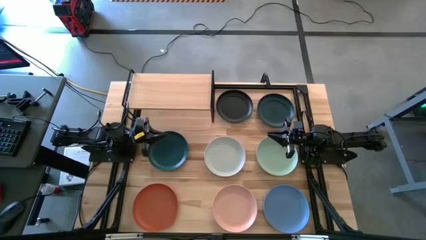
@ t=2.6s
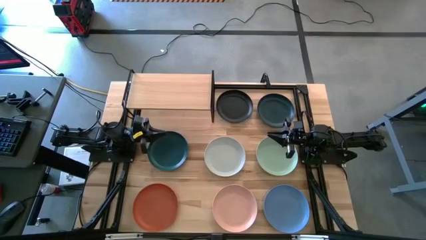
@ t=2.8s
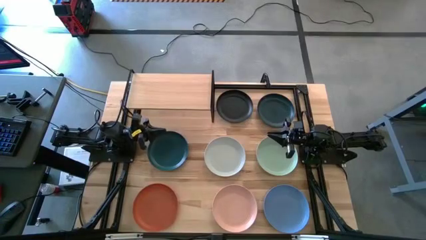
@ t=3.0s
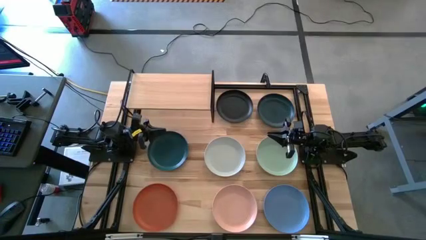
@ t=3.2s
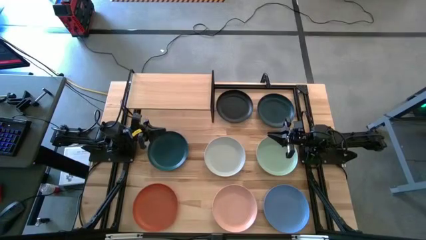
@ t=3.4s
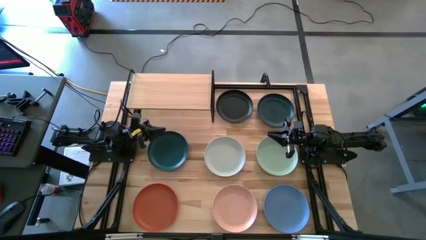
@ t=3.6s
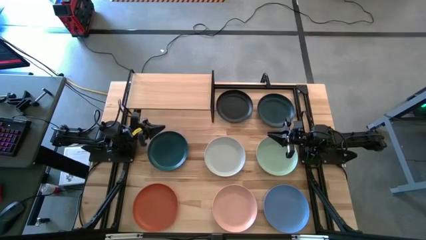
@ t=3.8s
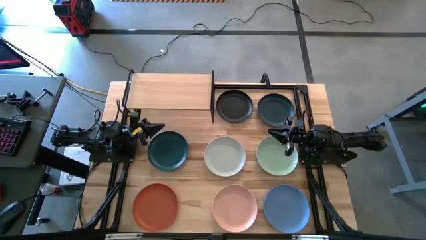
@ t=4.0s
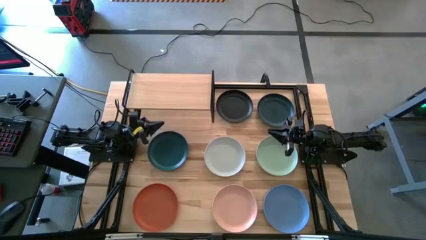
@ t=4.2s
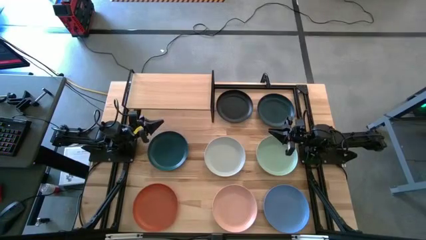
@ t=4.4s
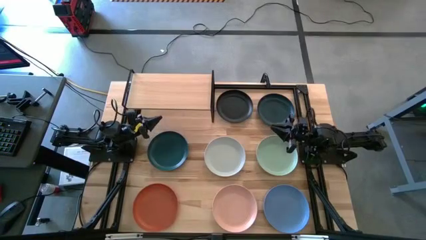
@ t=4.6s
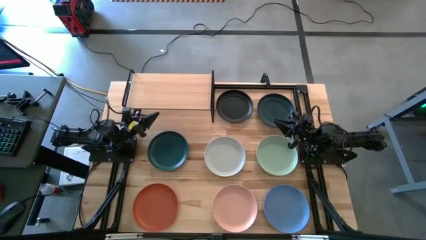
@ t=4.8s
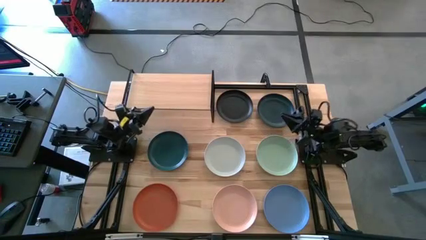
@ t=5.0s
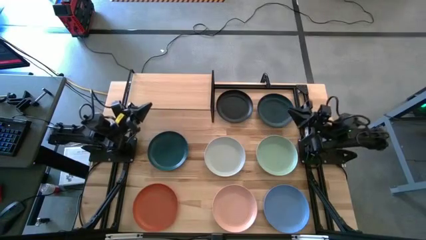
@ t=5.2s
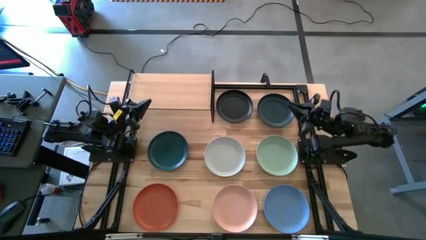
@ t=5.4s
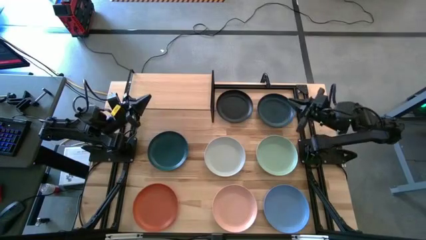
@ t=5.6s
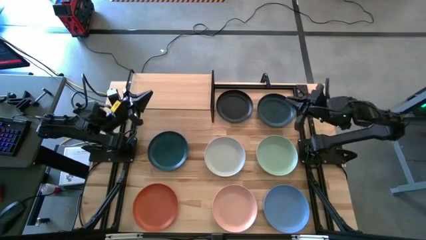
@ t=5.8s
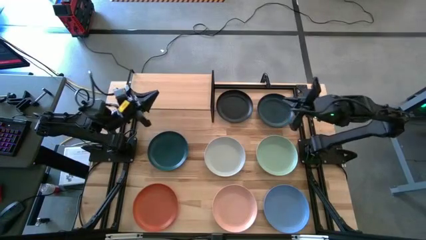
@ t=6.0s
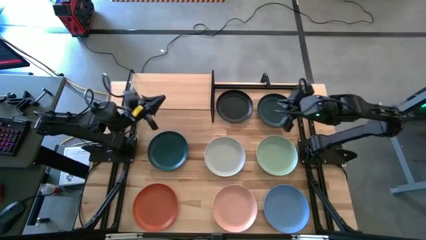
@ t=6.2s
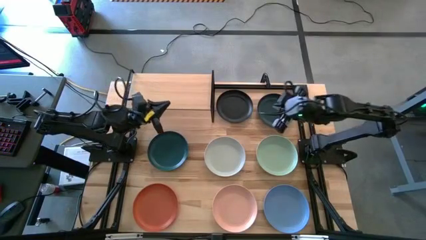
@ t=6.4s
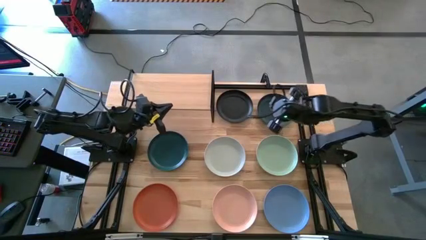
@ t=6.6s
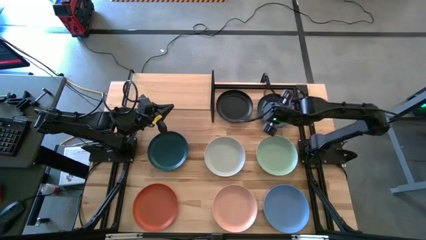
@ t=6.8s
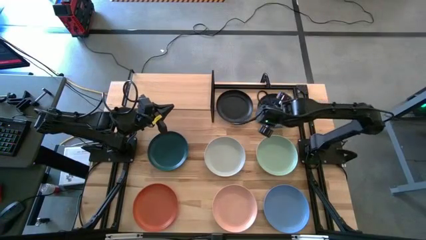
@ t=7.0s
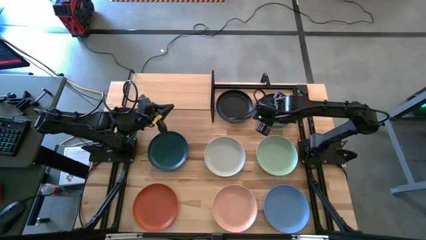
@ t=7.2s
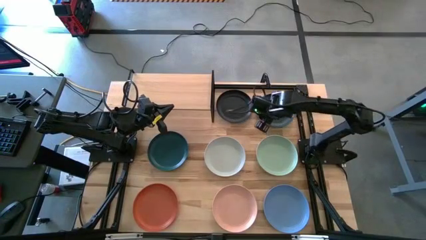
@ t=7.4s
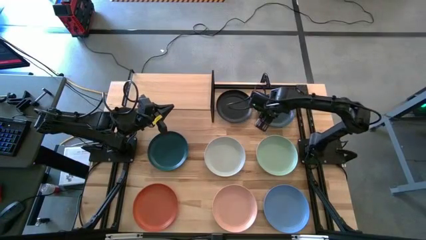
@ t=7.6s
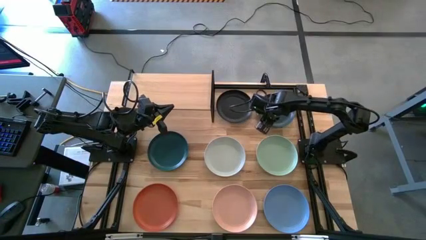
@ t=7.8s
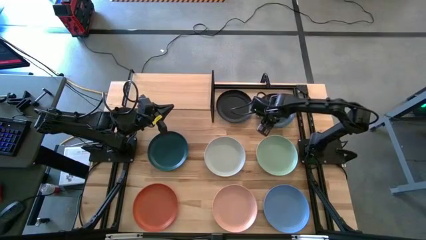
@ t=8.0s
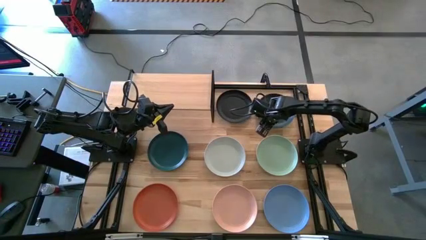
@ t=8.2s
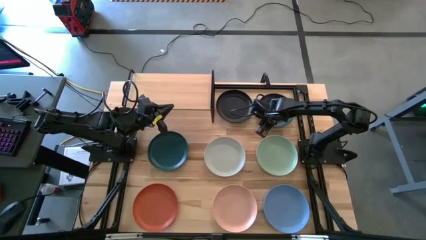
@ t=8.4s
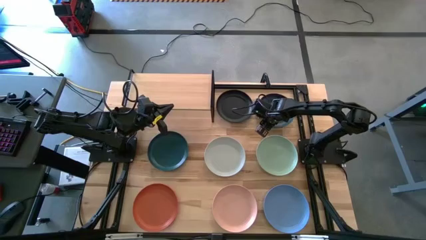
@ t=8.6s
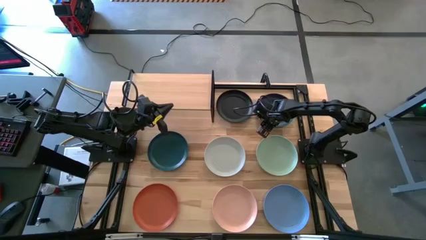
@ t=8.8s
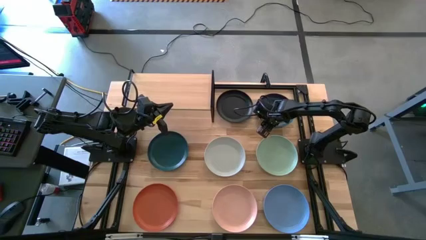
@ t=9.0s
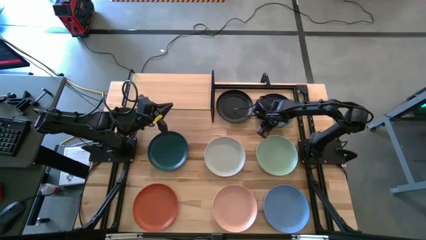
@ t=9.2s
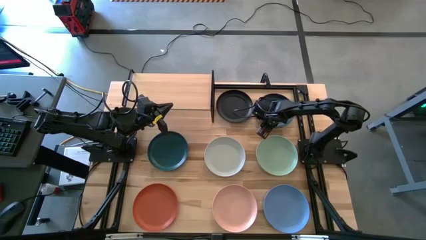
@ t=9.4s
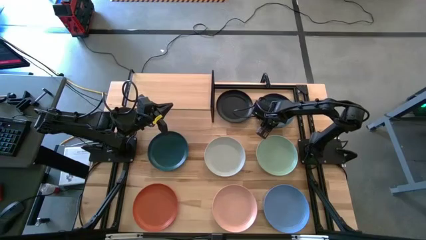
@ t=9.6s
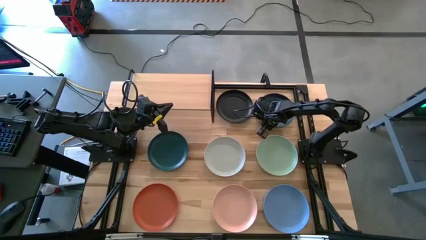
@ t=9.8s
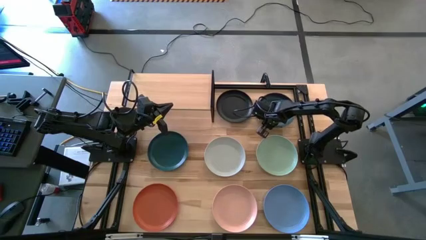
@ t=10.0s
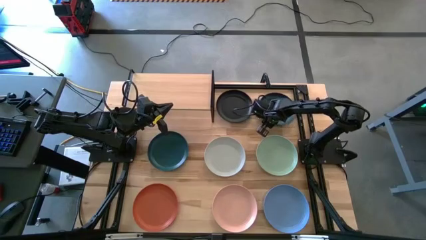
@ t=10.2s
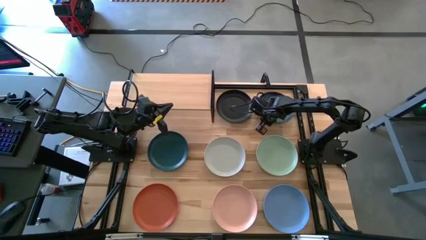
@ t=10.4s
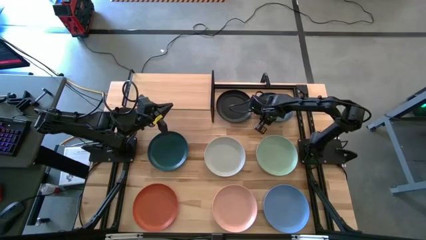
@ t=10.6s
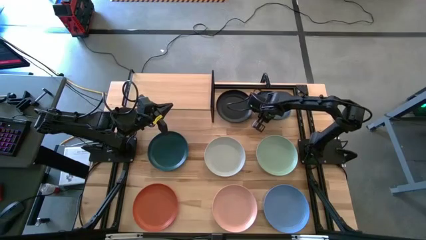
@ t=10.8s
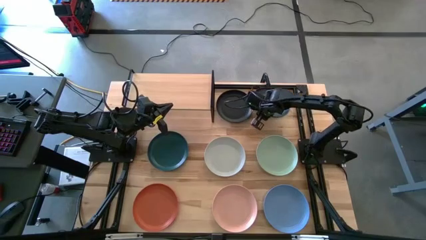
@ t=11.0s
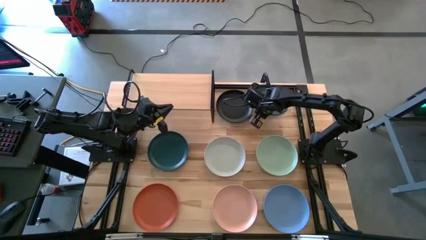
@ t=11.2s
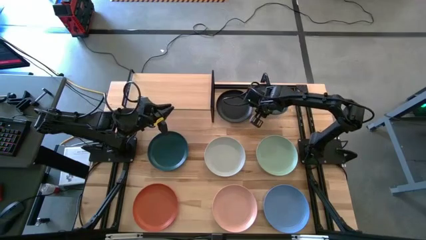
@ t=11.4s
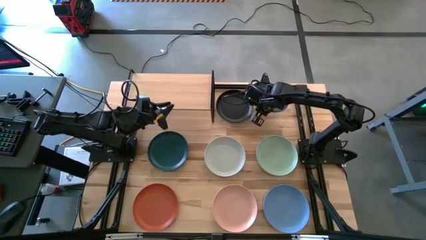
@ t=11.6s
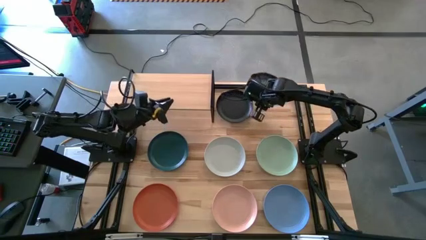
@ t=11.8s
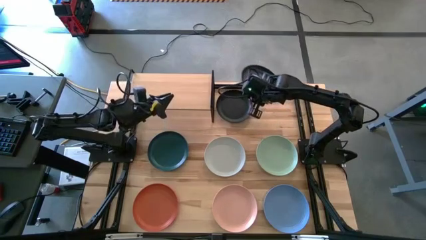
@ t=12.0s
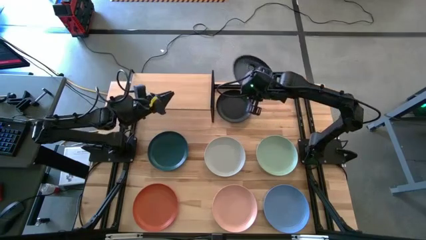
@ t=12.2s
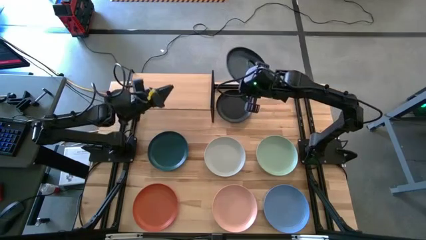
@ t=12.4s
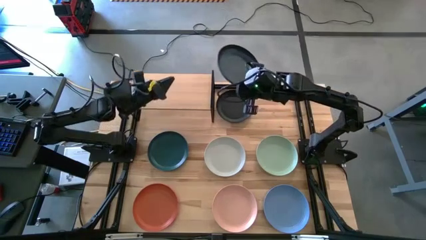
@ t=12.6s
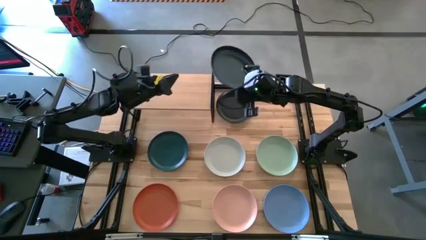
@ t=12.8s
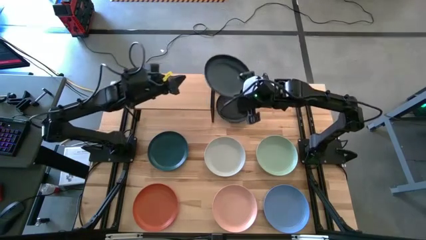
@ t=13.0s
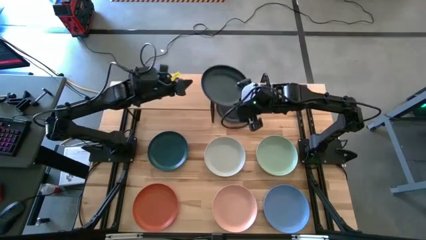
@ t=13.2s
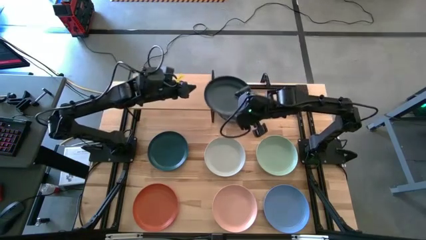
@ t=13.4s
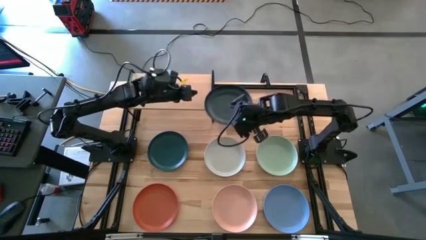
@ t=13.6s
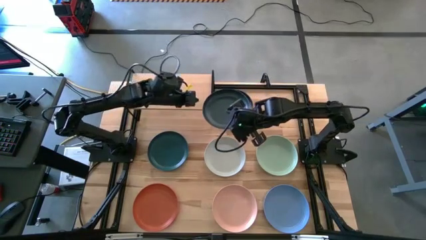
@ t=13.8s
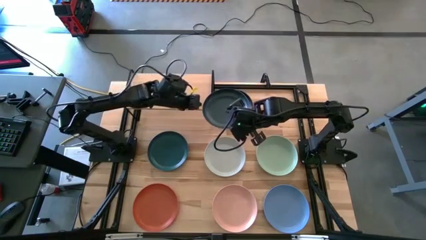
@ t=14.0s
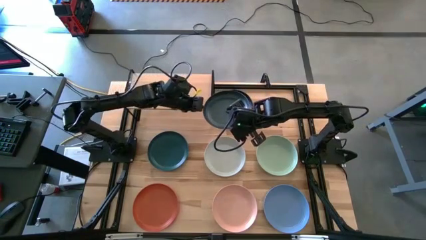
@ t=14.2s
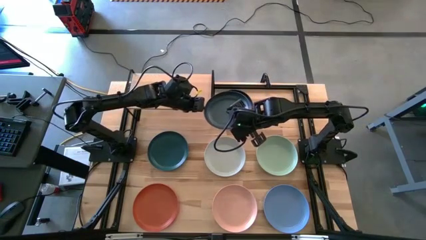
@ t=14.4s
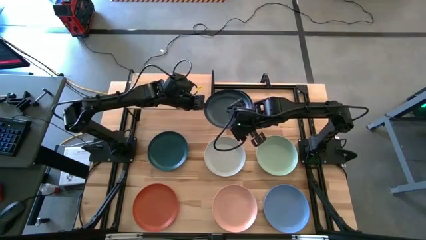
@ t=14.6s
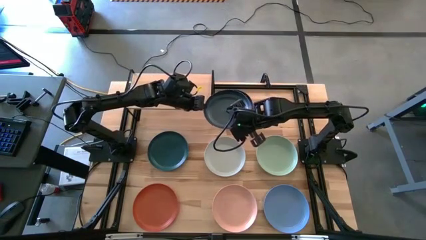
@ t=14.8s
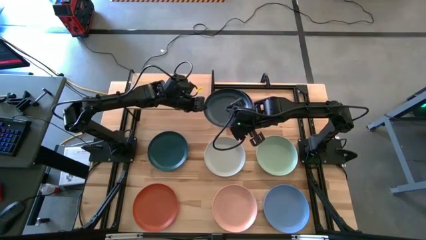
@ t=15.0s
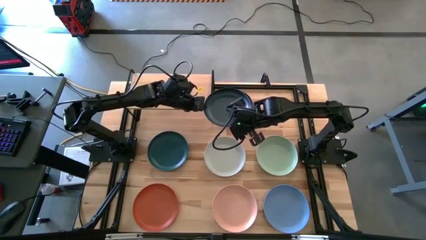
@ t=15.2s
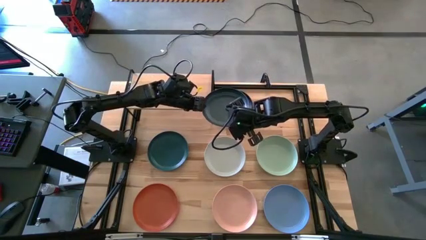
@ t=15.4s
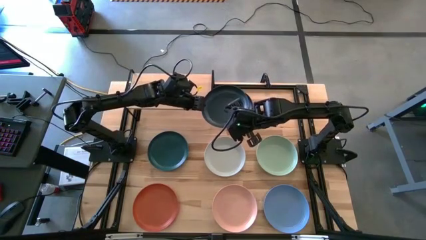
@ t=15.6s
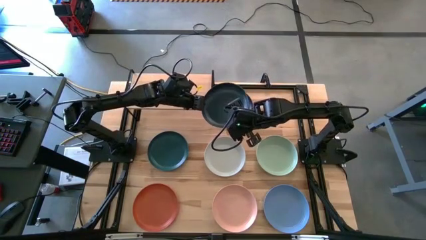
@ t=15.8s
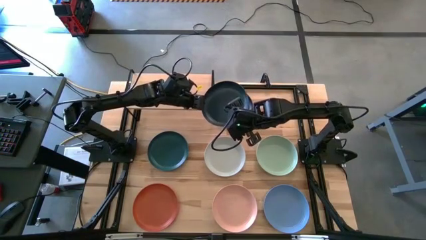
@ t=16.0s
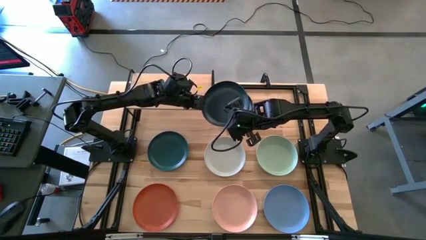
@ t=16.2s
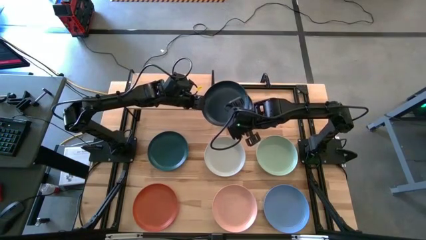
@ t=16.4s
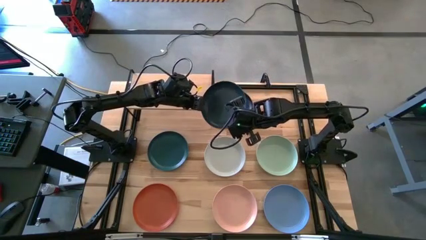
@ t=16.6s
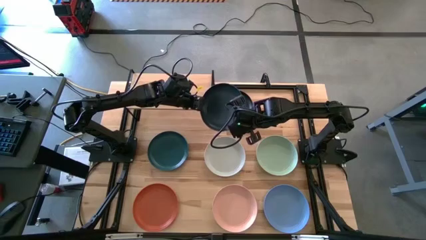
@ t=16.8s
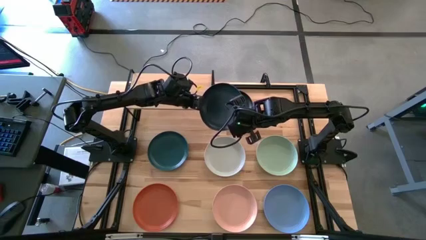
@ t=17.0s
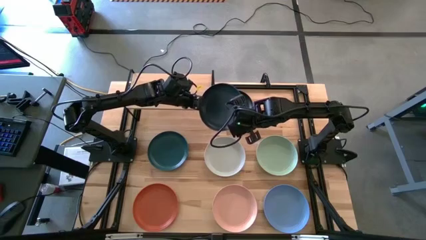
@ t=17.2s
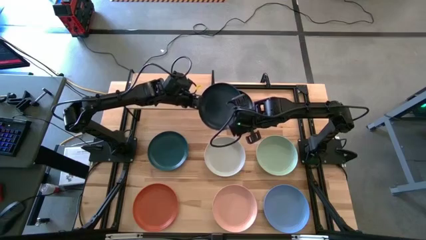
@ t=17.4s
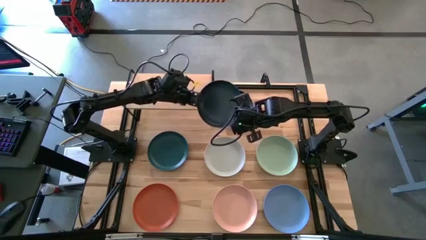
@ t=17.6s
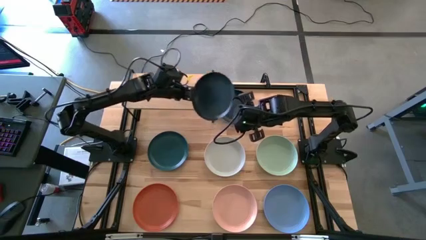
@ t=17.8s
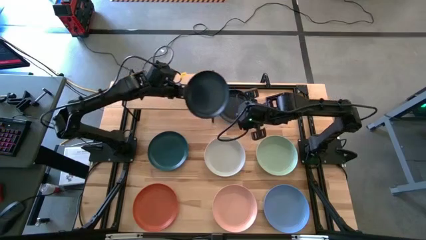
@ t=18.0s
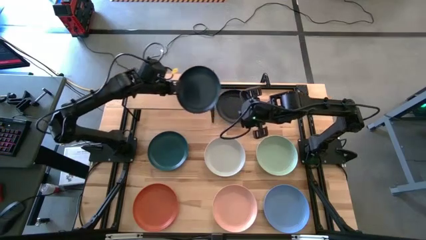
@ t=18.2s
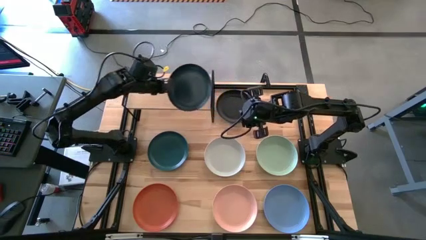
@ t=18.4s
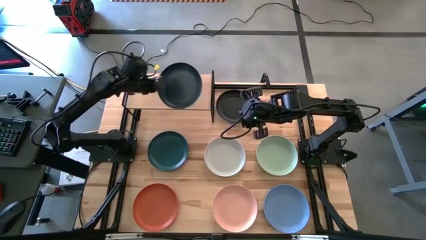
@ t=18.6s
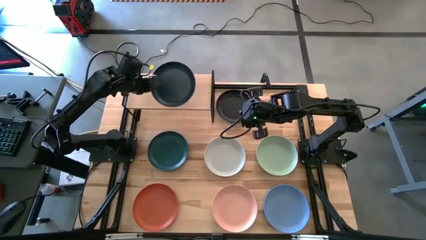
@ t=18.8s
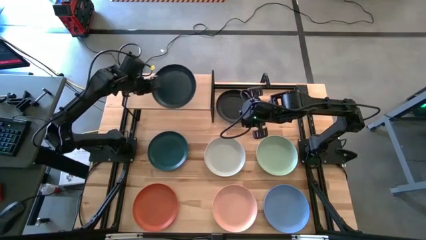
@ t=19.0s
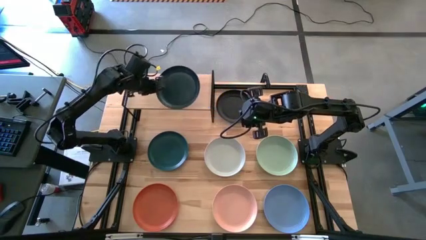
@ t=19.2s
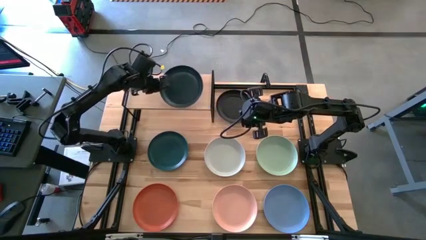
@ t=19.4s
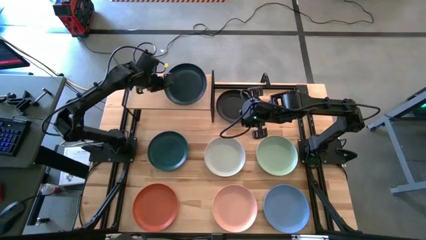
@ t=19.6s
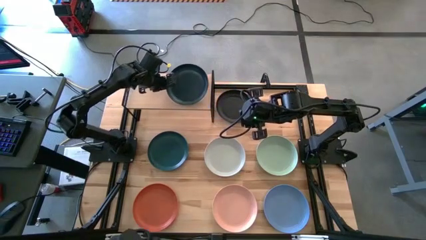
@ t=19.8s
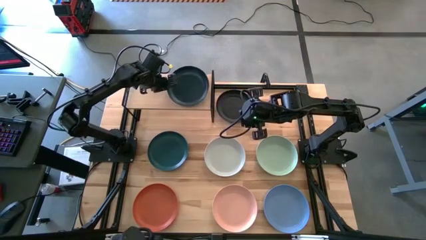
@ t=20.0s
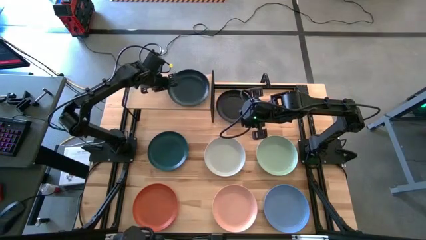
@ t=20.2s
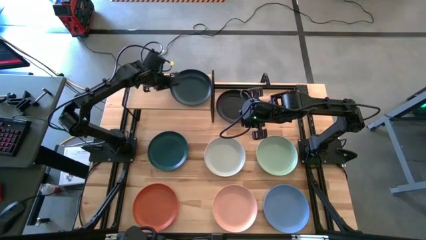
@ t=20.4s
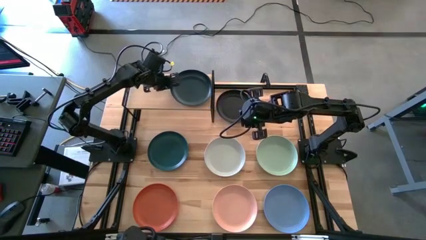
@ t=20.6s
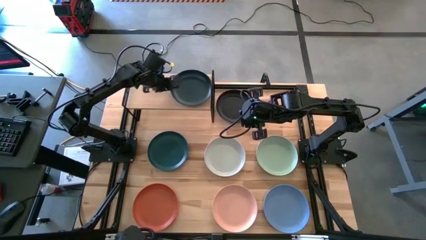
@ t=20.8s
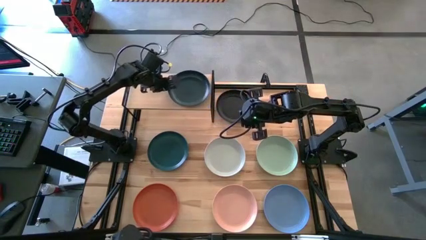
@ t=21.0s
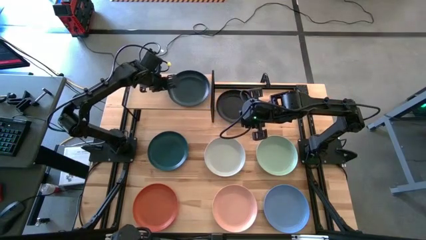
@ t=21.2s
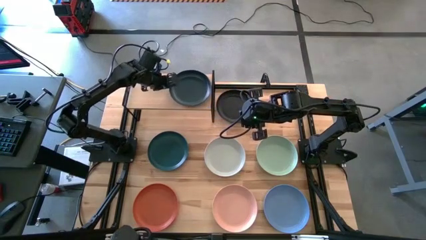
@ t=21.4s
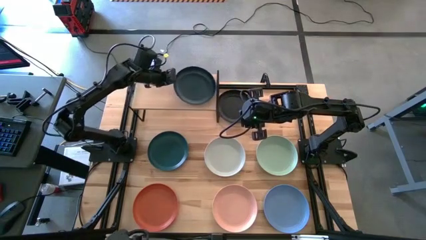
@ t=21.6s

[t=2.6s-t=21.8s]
Task: Place and stack plates onto a shelf
Put the top dark blue plate on the shelf
